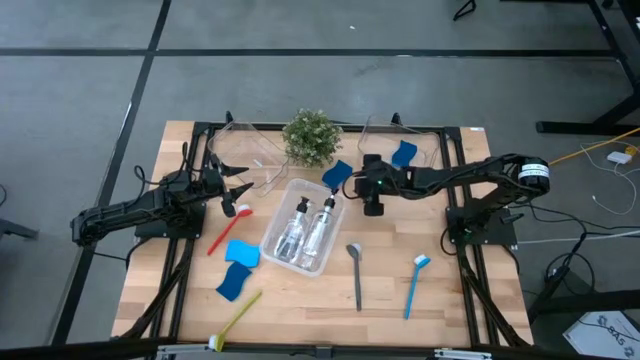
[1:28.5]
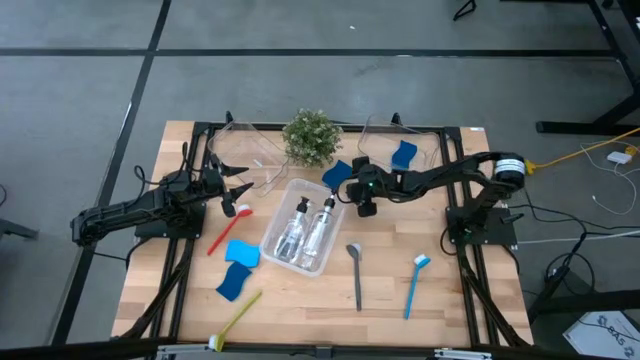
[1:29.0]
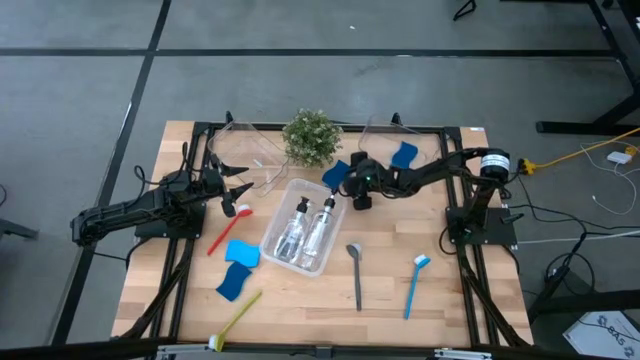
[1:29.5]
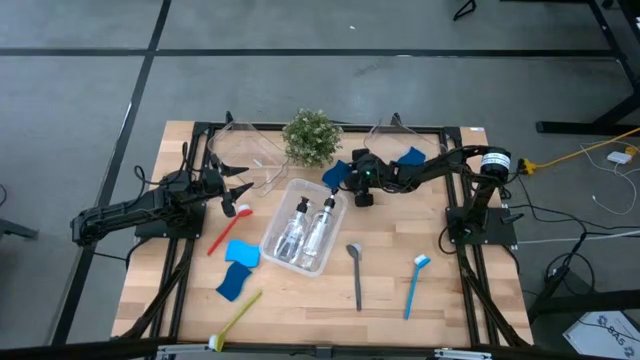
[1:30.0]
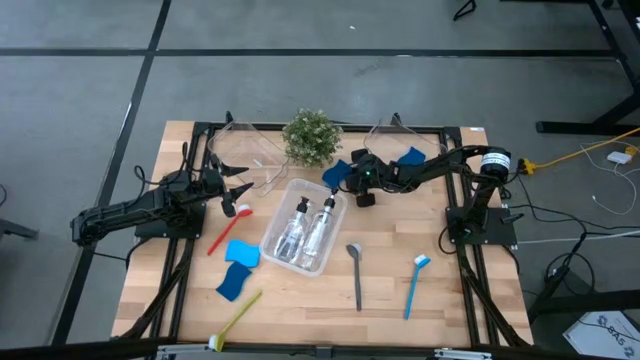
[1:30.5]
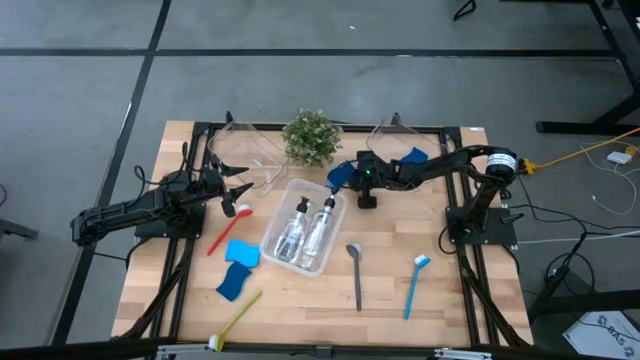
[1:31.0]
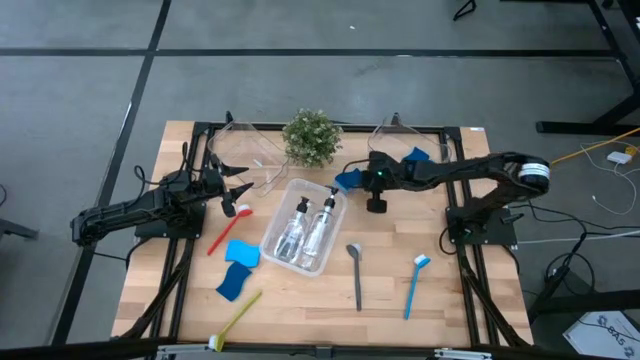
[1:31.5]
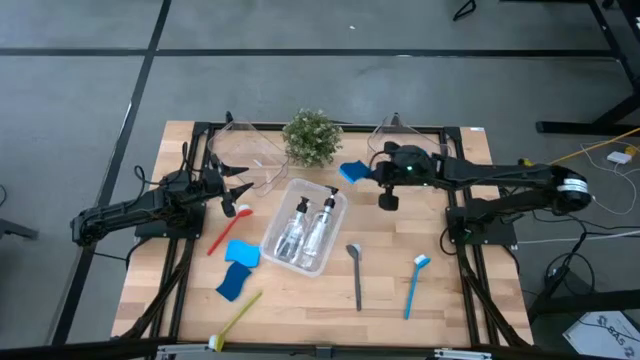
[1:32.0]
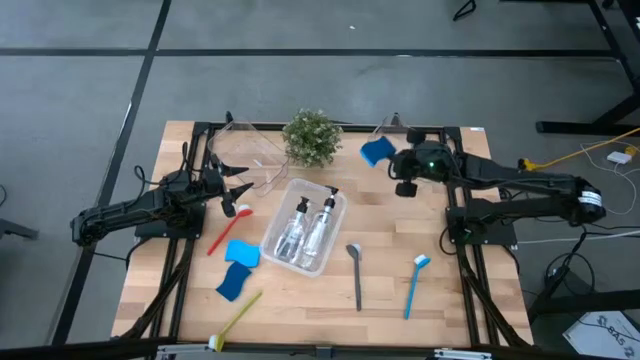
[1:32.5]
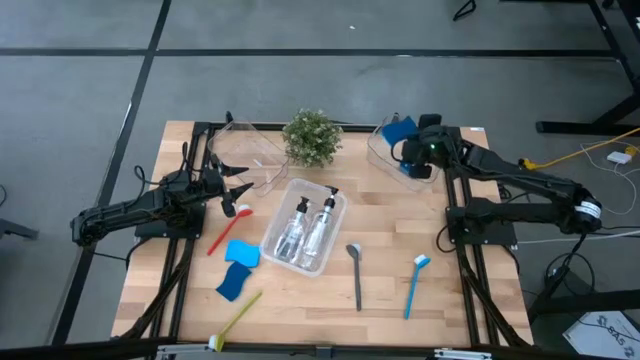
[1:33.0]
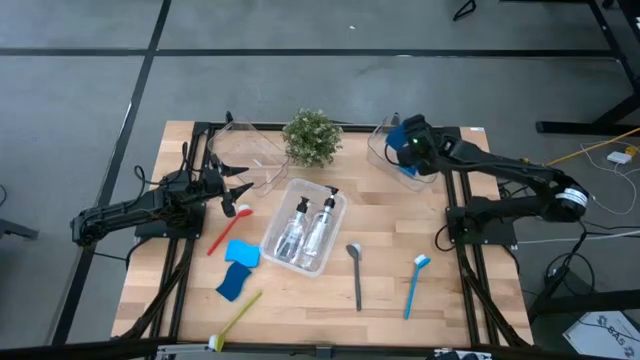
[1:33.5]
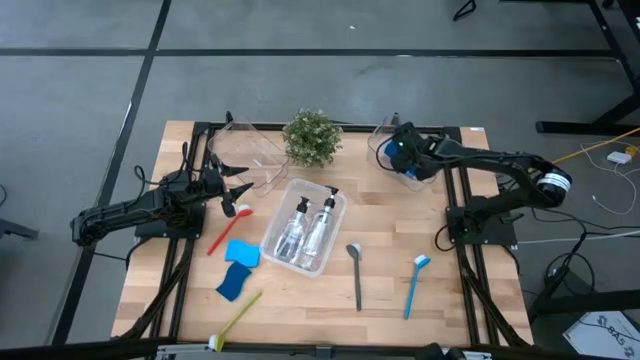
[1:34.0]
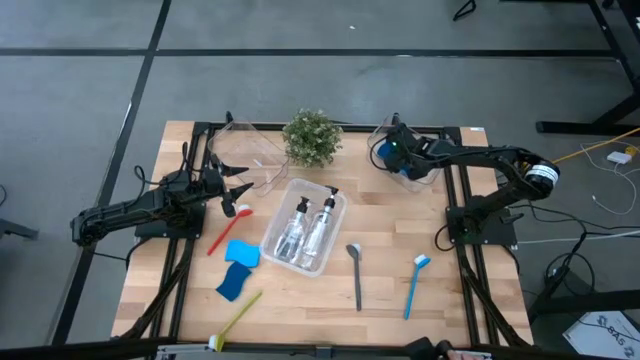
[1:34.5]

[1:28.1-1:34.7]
Task: Pick & Place Kitchen Sink Supplies
Put the blue sponge into the right transparent bin

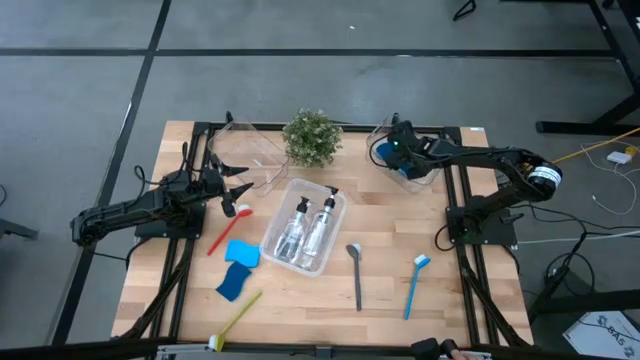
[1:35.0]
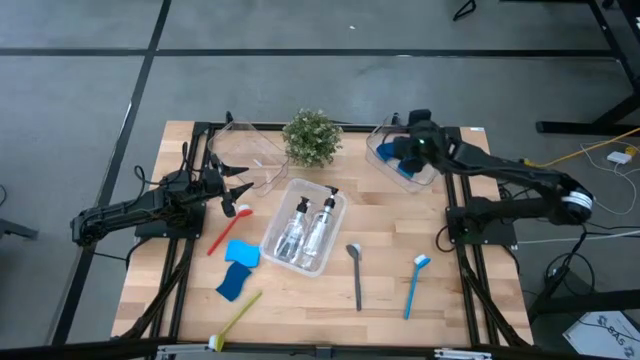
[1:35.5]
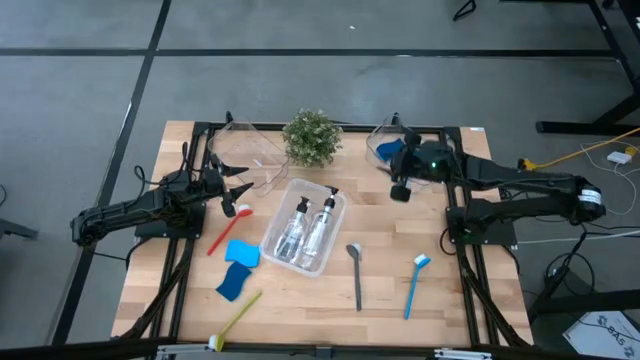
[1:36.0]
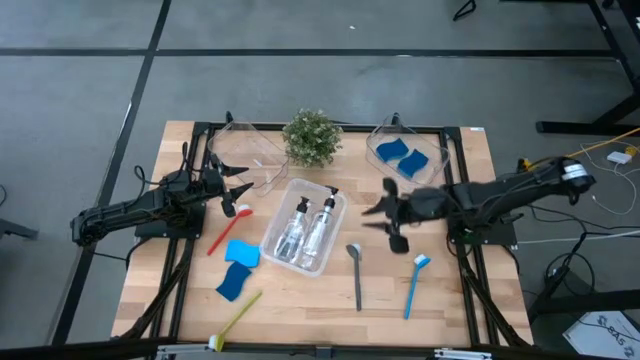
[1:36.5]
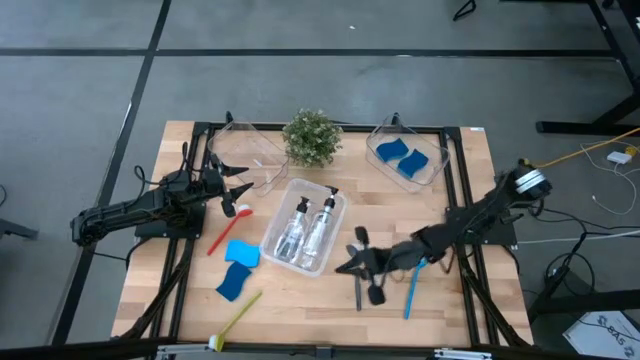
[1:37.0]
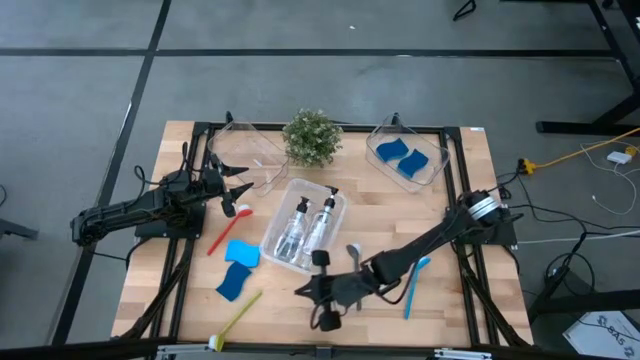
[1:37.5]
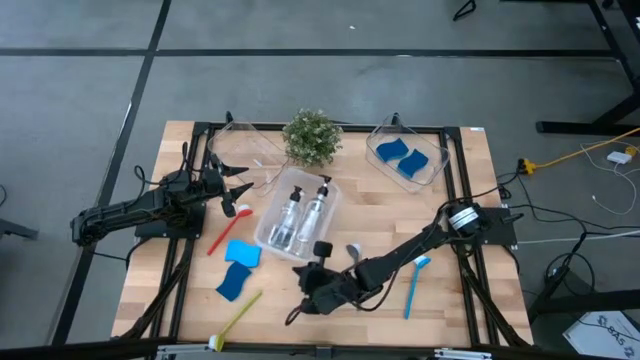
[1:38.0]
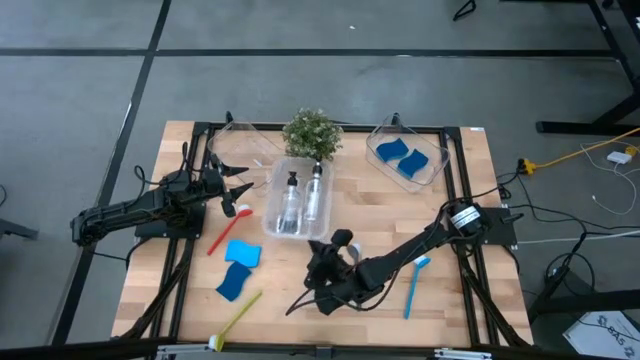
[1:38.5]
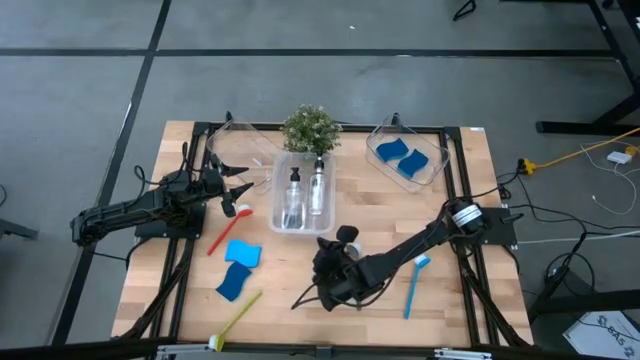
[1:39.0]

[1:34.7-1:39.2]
Adjust the white bin

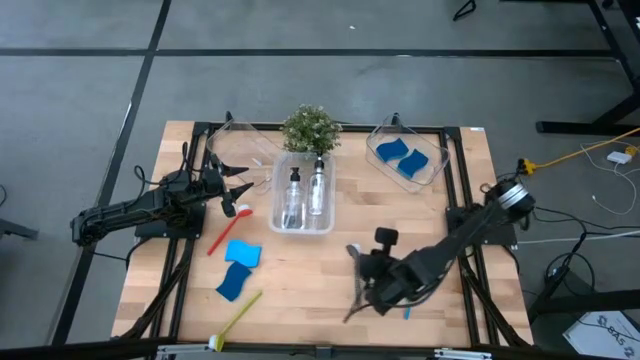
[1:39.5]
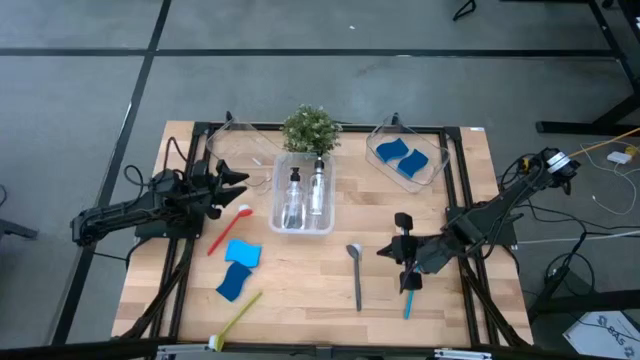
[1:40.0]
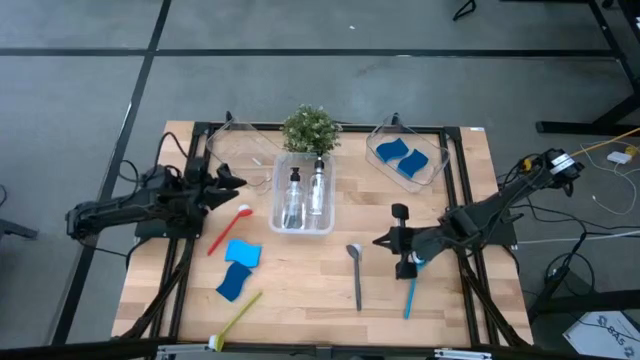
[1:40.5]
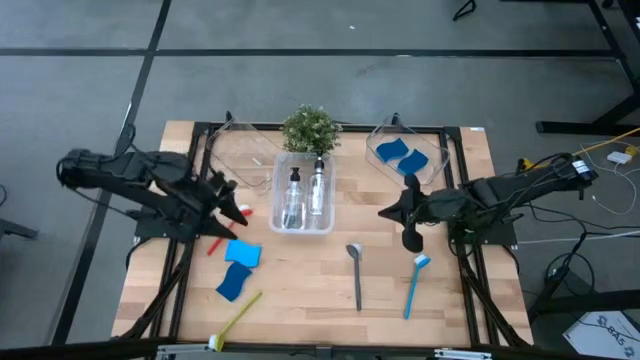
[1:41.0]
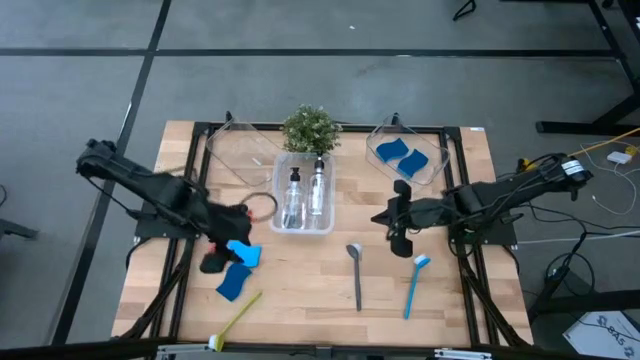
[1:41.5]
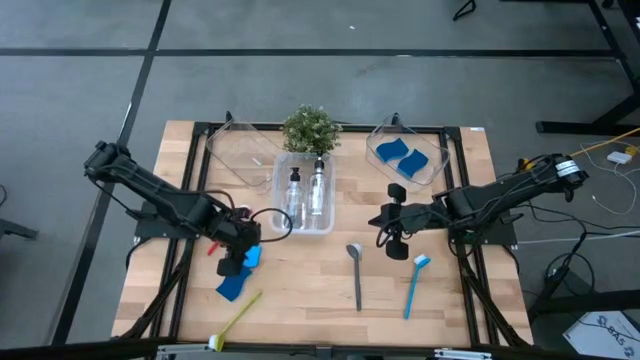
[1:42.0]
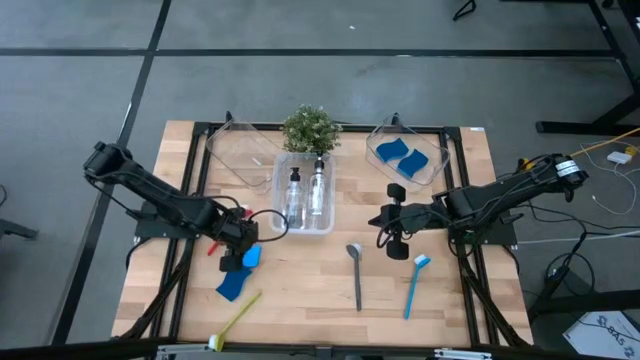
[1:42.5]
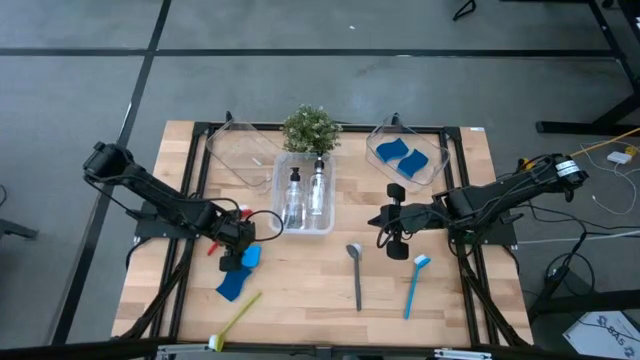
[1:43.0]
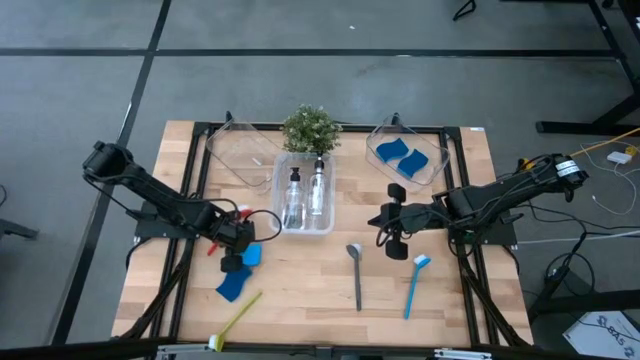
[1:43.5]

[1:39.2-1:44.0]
Put the blue sponge into the right transparent bin

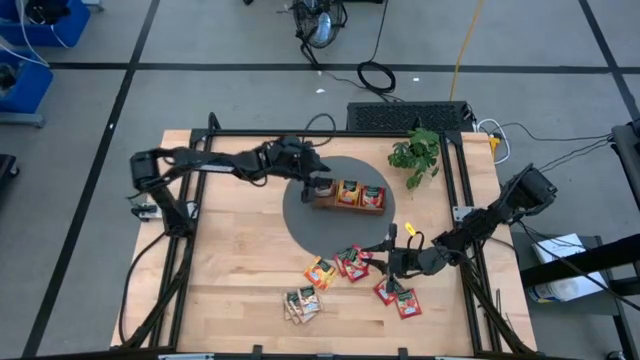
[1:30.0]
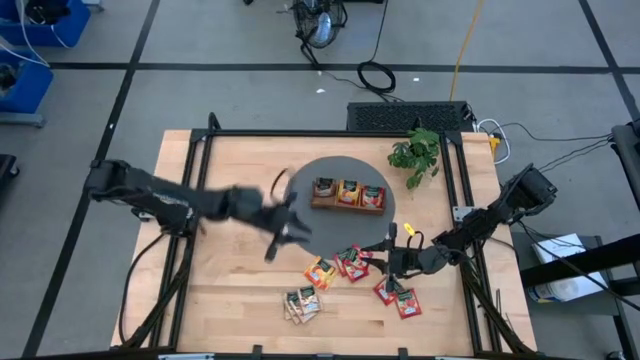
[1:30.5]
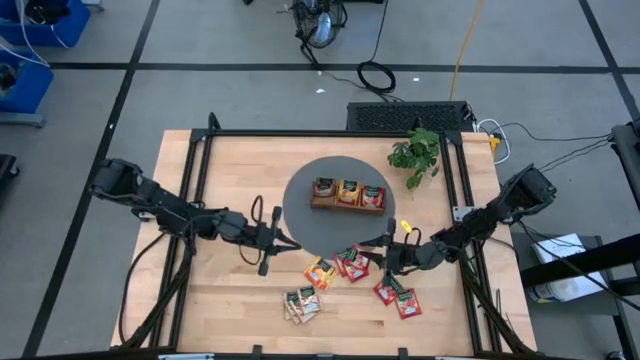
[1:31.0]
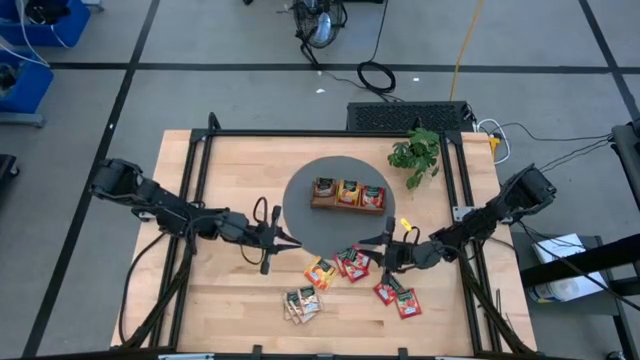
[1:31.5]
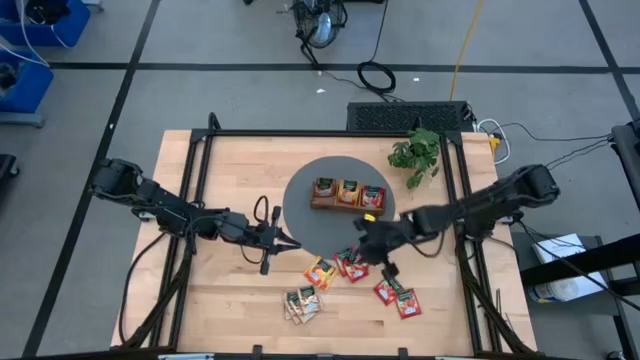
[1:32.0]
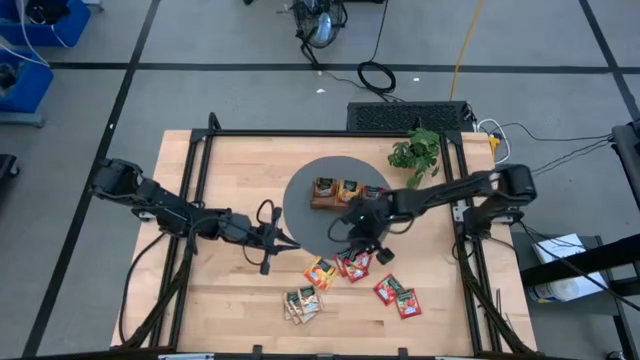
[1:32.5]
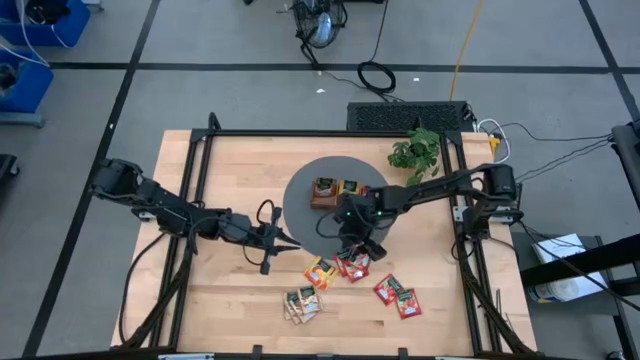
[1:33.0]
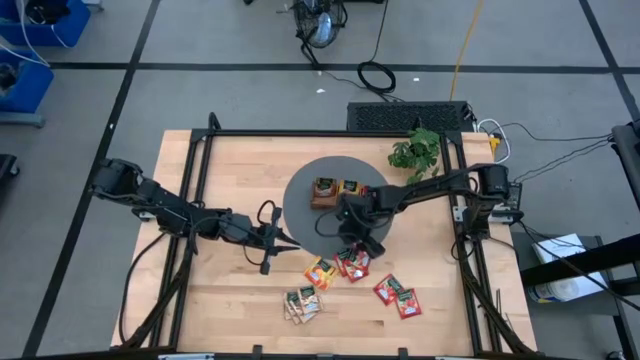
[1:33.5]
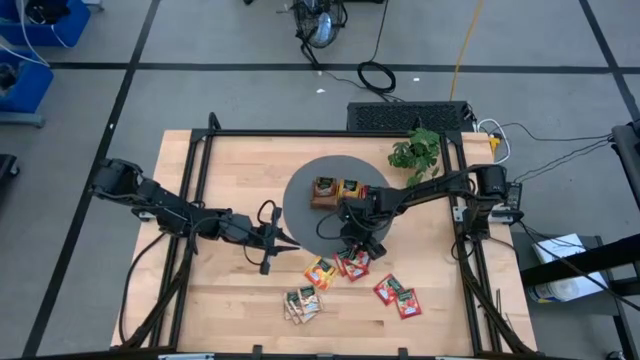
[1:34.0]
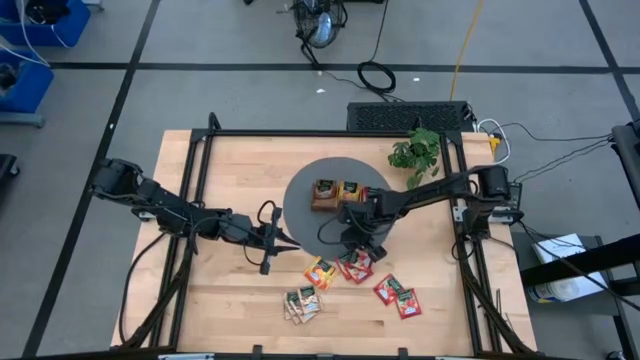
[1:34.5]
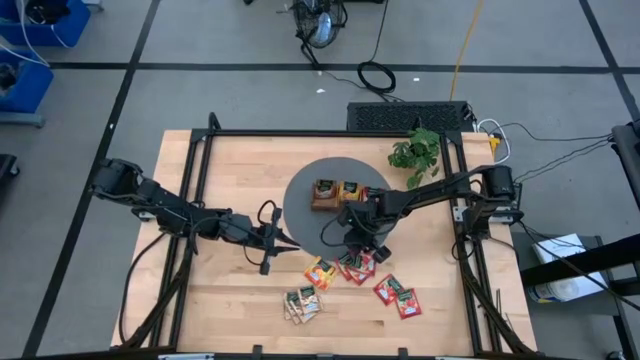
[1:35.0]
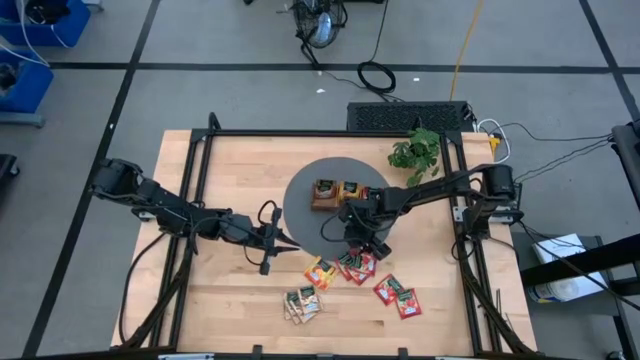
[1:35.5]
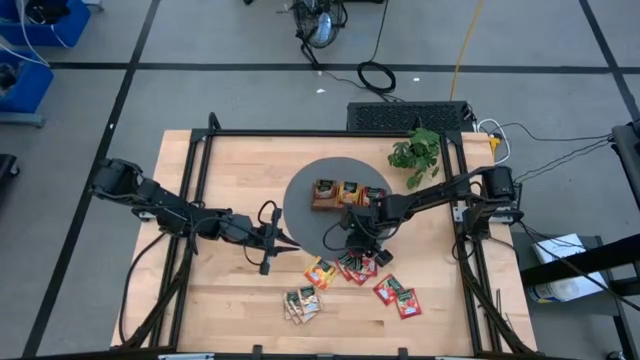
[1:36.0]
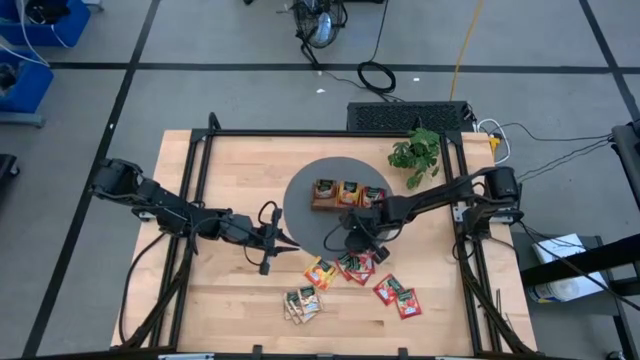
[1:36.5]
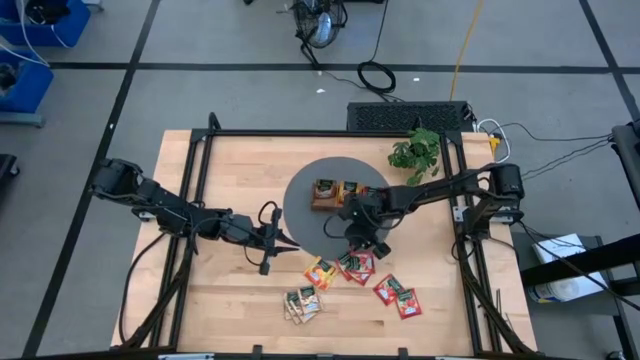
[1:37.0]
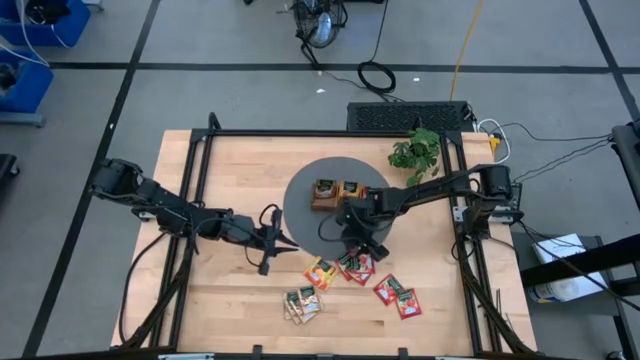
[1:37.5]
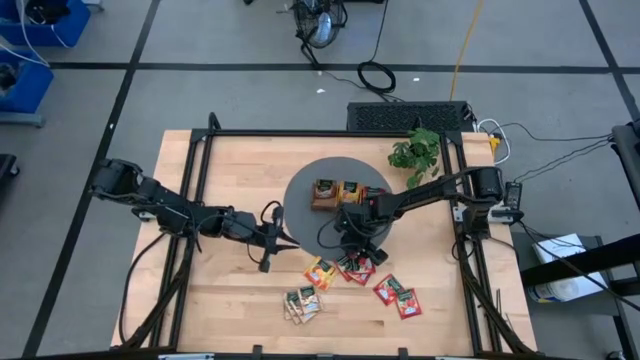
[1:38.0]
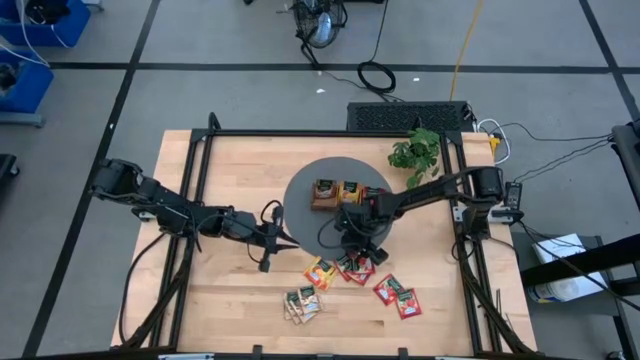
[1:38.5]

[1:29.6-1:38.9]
Task: Pick & Place Tea
Put the red tea bag to the right section into the wooden organizer
